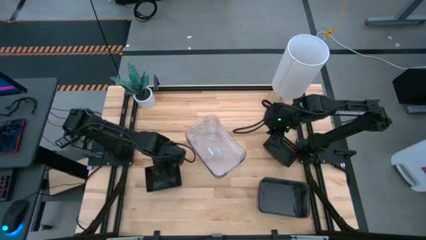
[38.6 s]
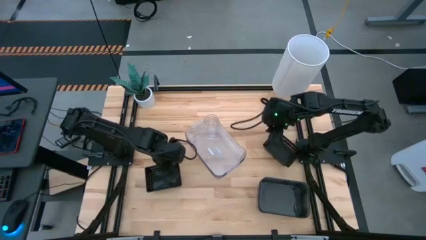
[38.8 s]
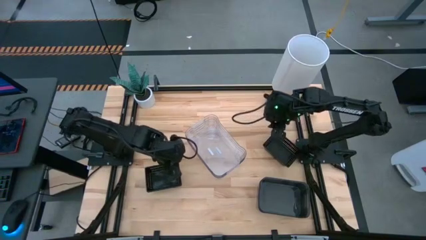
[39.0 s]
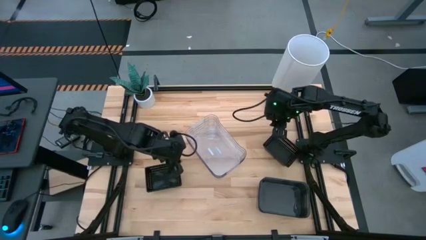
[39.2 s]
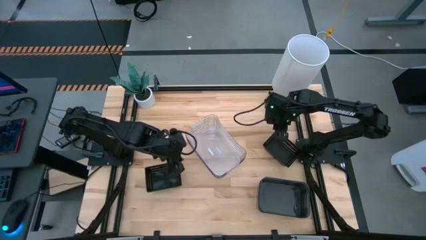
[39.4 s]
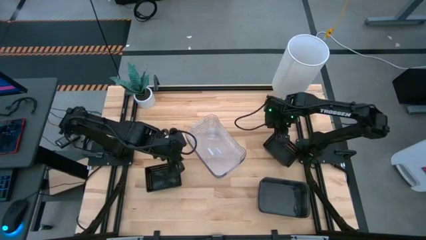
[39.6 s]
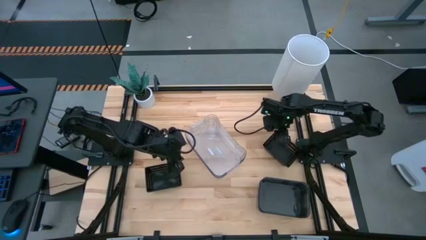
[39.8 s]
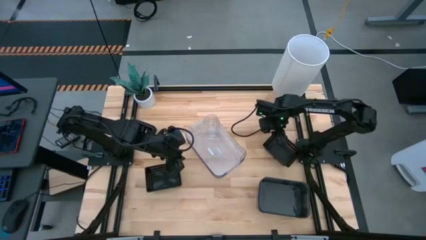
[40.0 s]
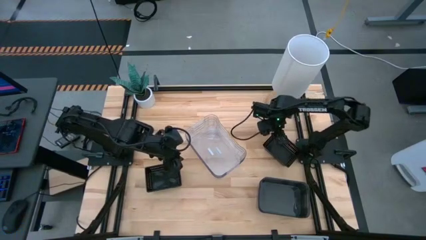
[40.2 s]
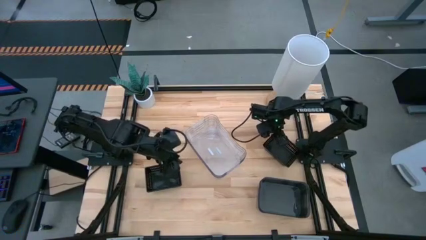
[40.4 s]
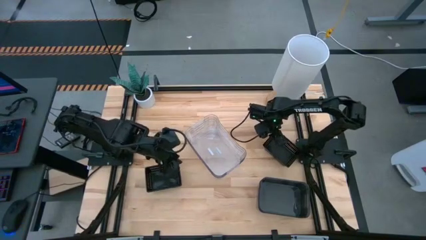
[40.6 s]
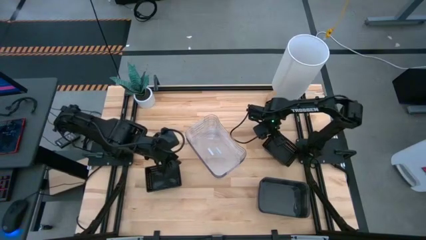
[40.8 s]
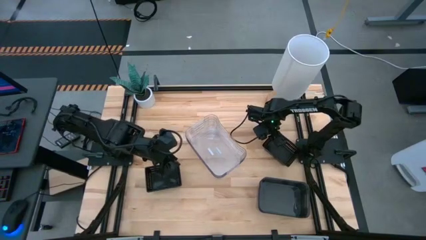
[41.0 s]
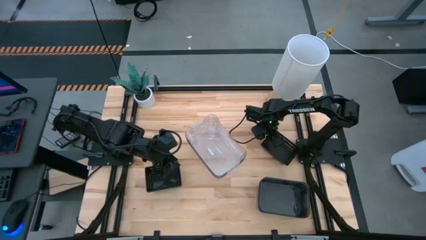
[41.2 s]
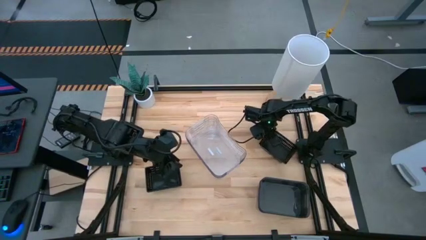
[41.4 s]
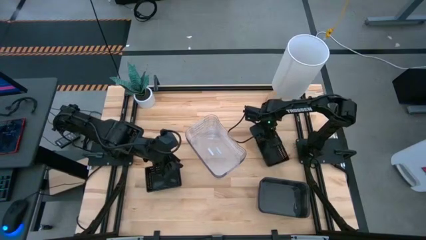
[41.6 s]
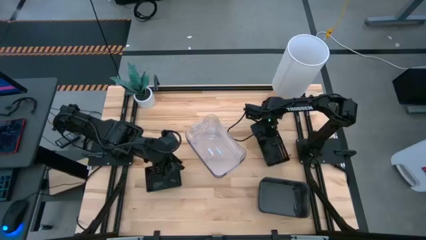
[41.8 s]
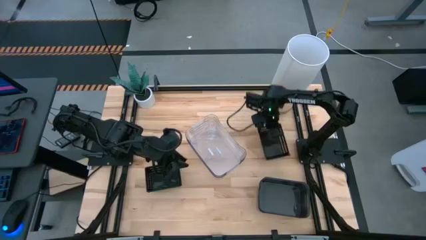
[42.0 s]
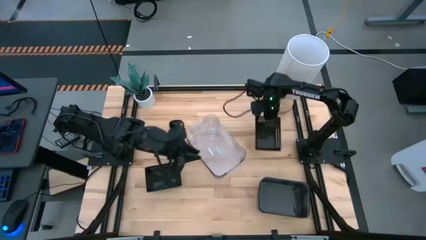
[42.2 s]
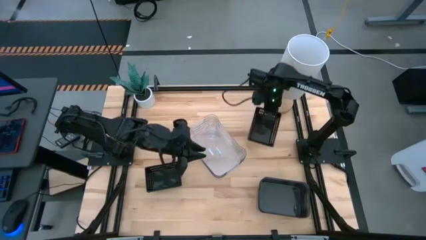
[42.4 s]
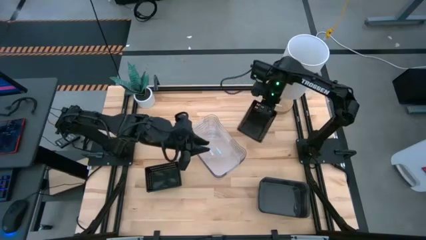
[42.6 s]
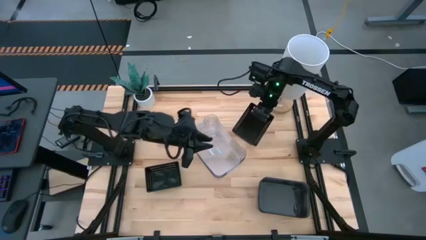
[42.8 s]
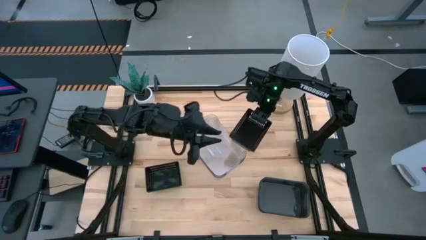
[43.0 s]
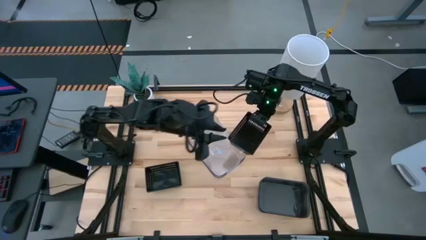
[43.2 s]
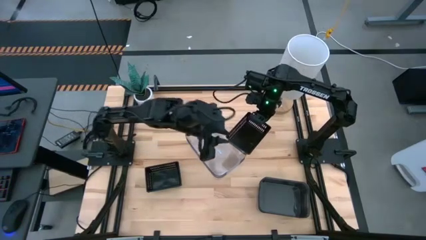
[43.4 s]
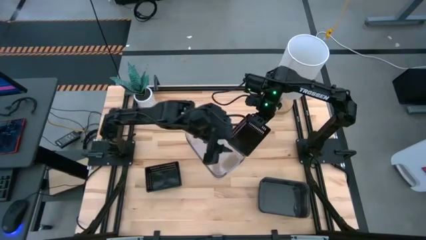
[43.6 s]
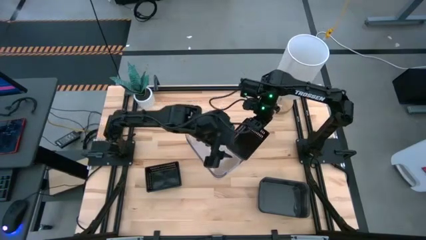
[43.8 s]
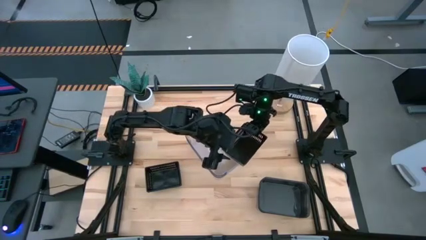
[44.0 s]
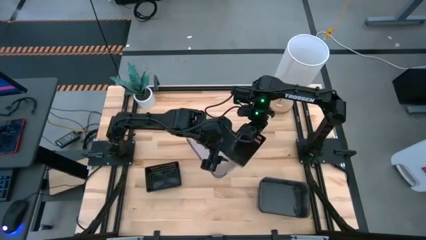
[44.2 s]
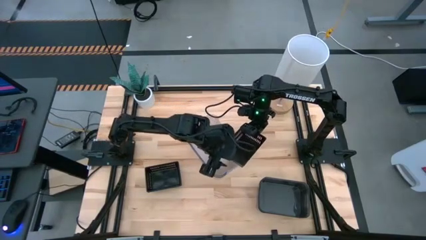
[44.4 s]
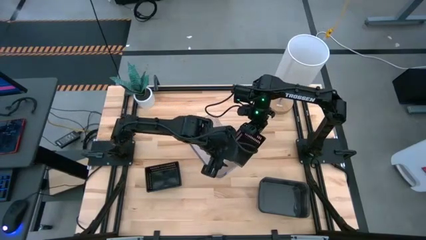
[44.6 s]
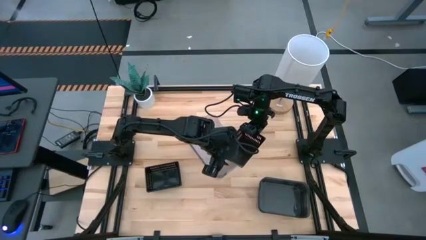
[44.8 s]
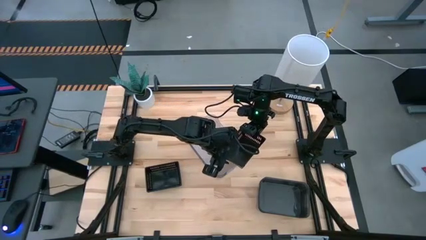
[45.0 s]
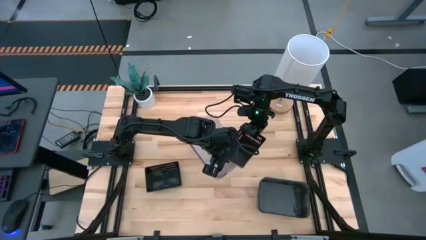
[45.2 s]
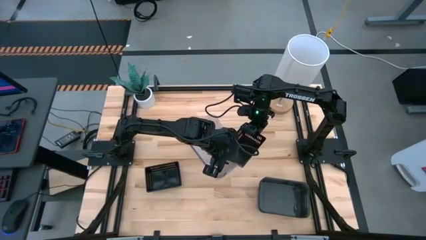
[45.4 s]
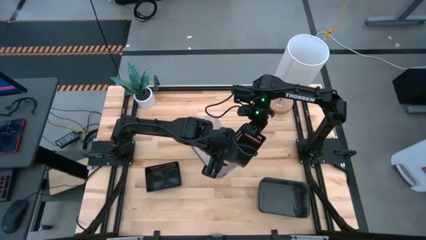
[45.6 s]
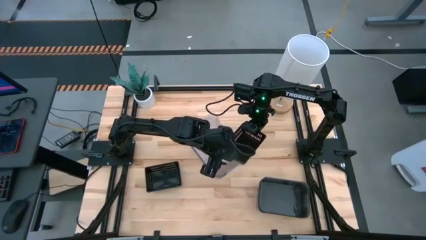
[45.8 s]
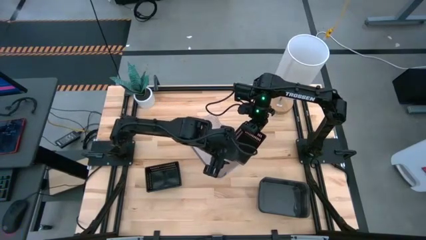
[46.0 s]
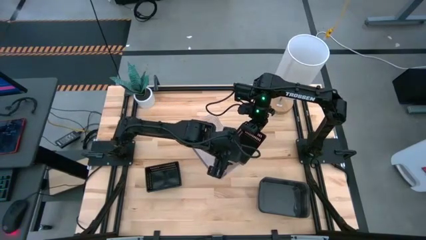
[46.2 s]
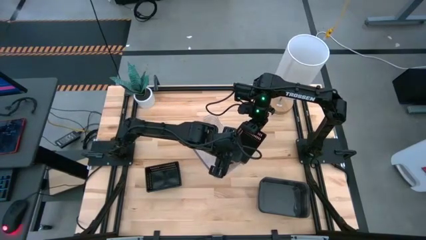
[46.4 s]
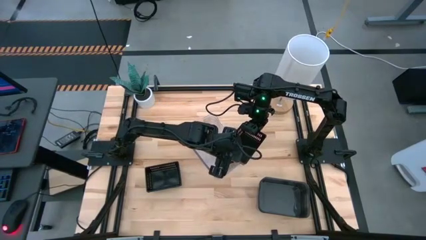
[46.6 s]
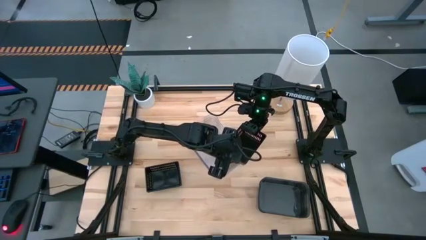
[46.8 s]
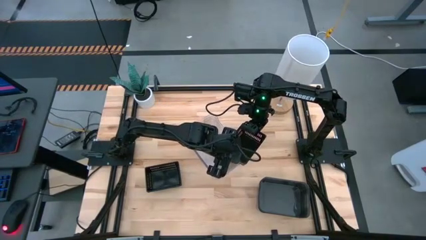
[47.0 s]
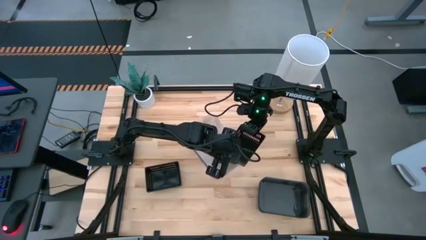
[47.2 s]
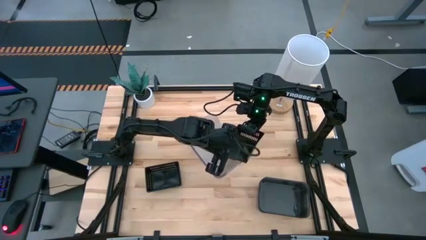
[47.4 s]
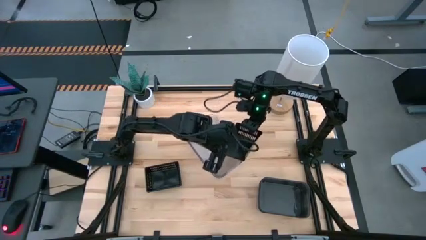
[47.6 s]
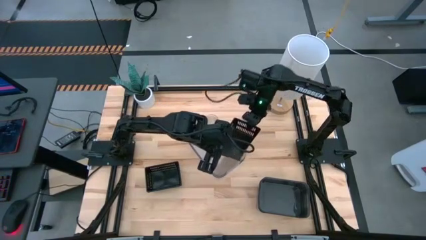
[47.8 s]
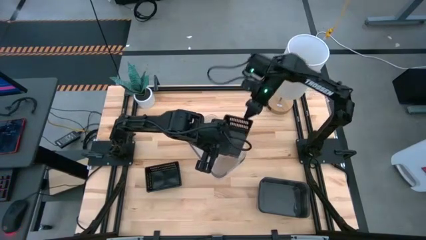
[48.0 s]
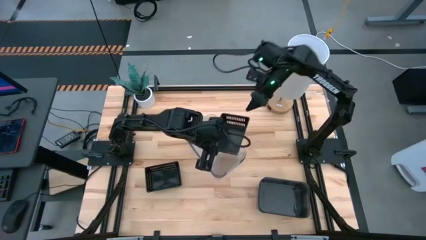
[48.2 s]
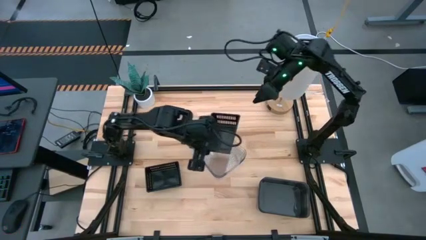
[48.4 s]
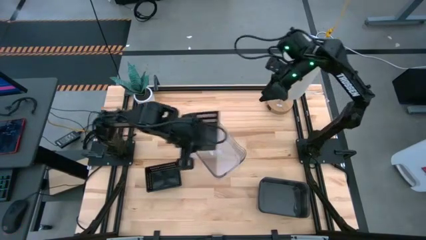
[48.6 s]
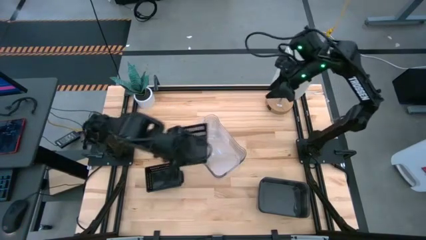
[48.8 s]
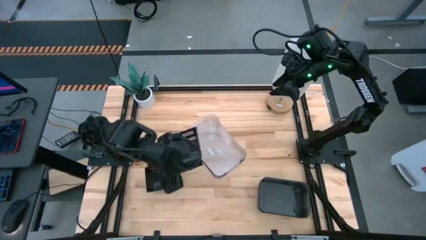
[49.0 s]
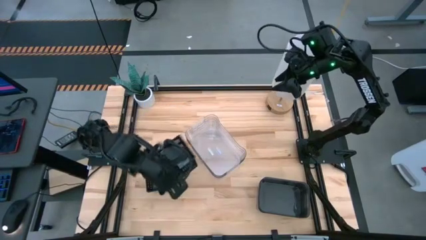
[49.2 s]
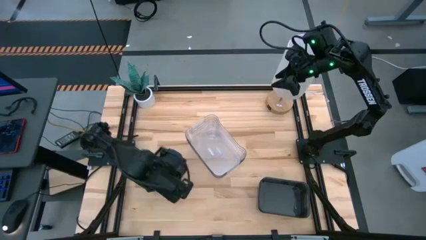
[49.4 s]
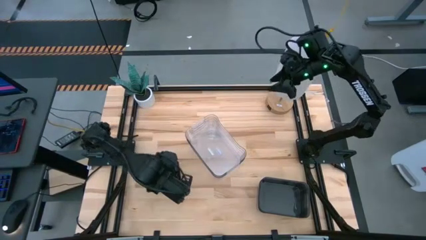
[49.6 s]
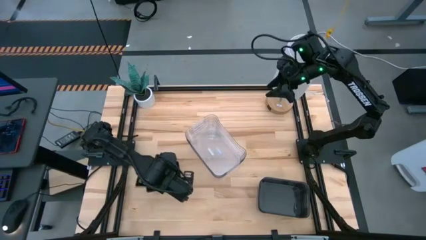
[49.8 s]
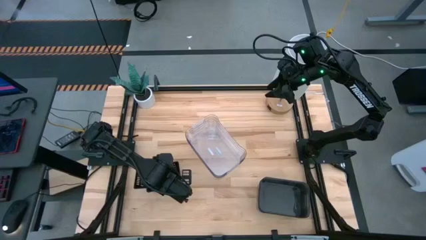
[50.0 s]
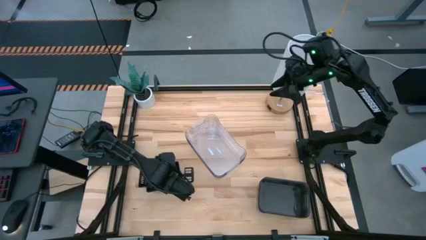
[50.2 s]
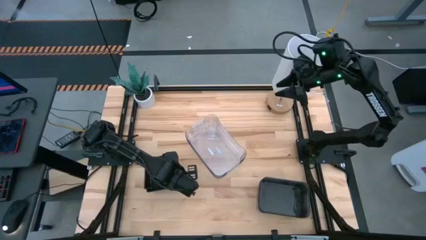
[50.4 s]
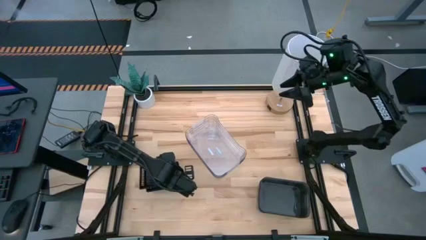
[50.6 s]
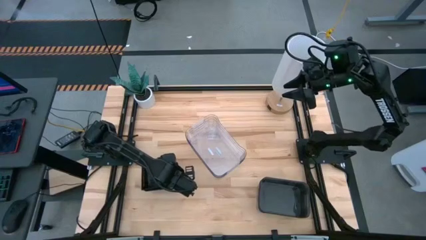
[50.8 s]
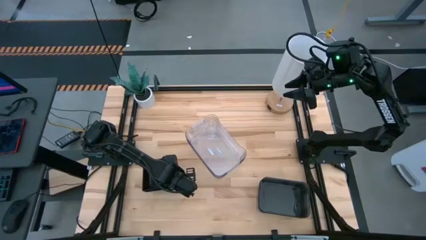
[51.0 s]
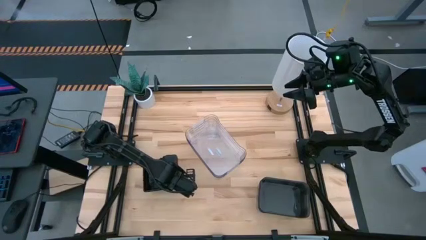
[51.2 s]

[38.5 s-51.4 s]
Stack the right black bin on top of the left black bin
